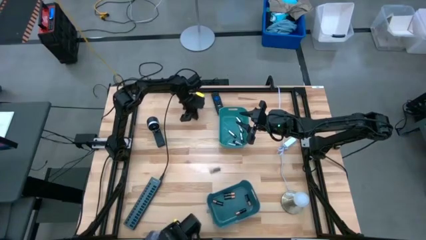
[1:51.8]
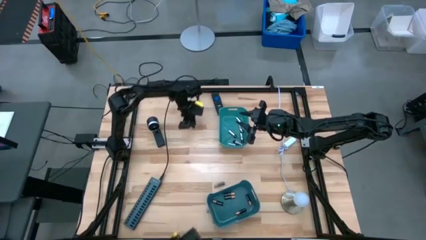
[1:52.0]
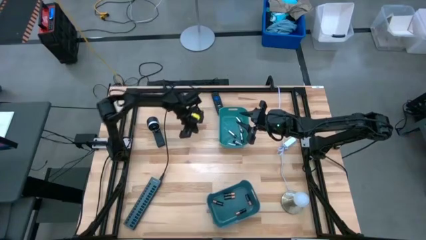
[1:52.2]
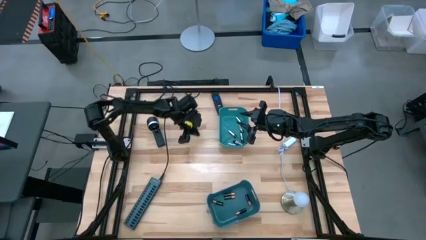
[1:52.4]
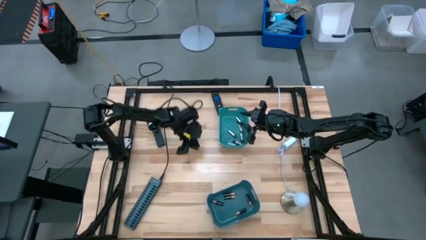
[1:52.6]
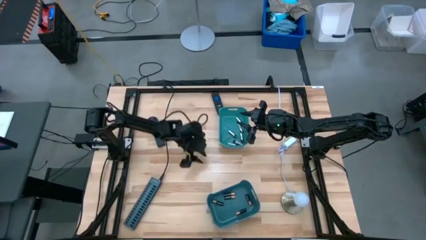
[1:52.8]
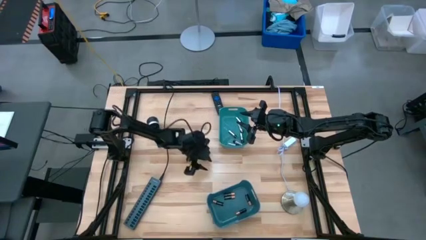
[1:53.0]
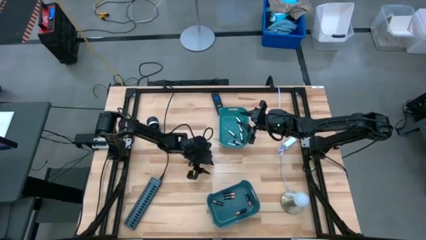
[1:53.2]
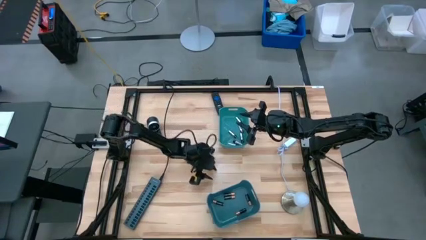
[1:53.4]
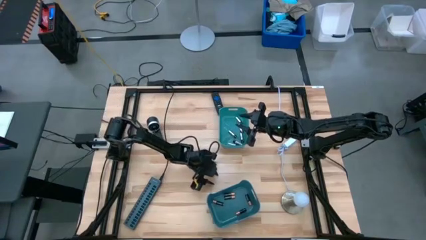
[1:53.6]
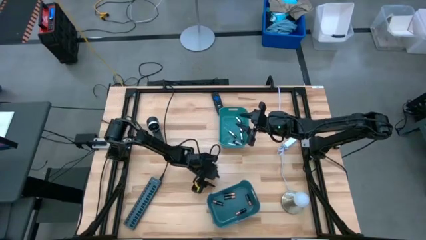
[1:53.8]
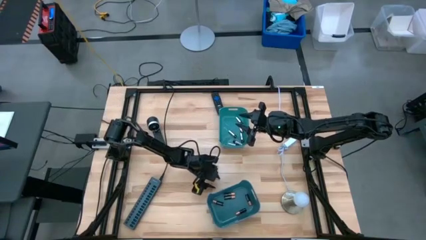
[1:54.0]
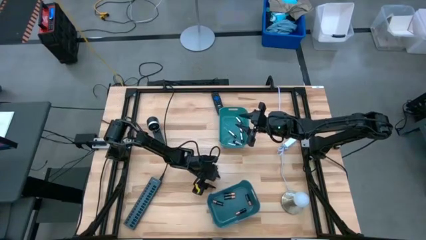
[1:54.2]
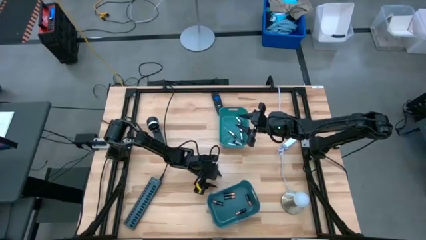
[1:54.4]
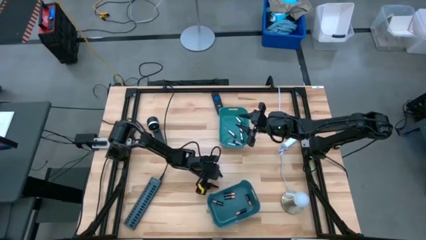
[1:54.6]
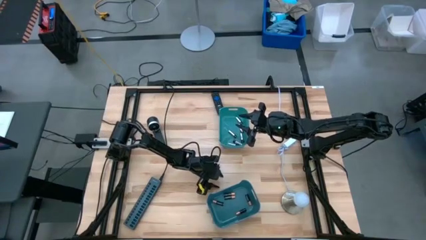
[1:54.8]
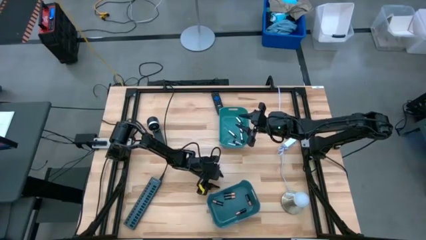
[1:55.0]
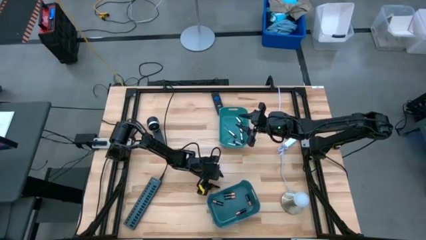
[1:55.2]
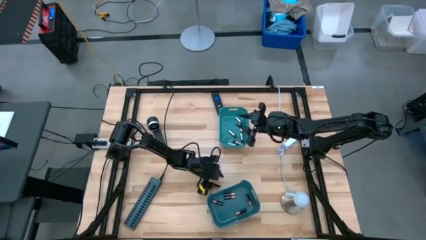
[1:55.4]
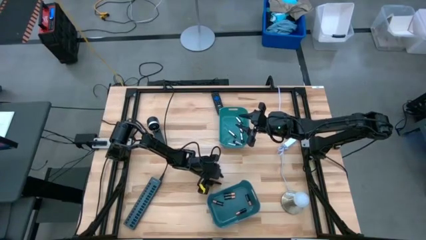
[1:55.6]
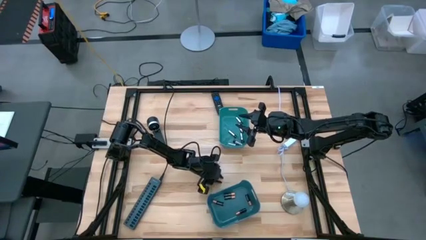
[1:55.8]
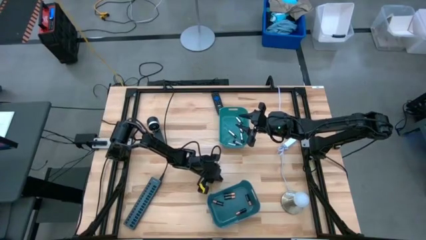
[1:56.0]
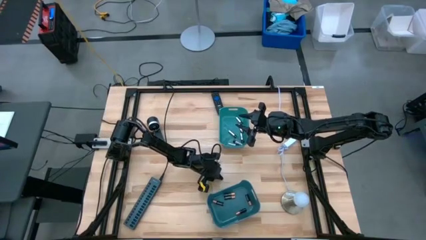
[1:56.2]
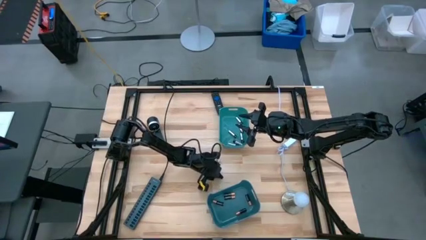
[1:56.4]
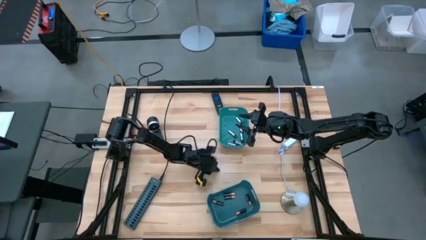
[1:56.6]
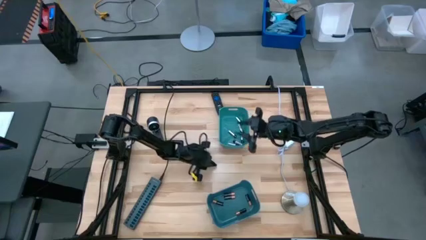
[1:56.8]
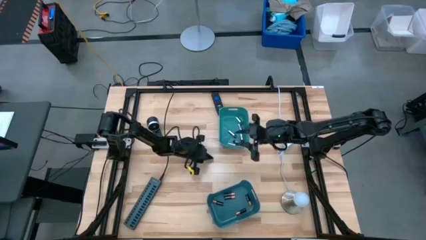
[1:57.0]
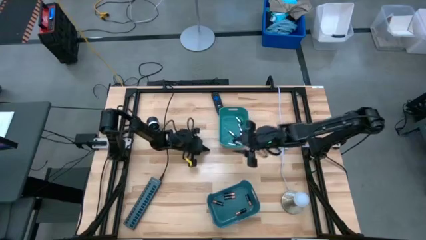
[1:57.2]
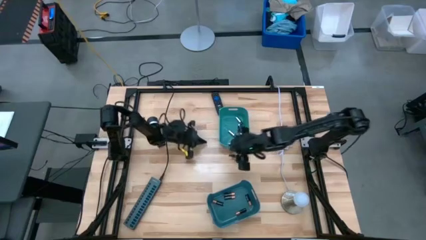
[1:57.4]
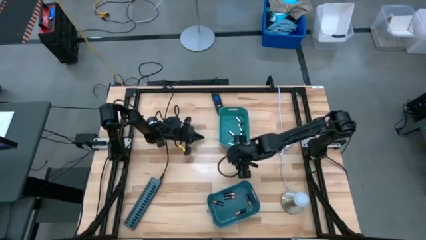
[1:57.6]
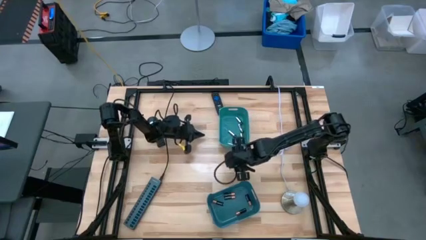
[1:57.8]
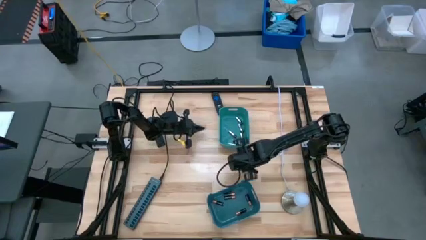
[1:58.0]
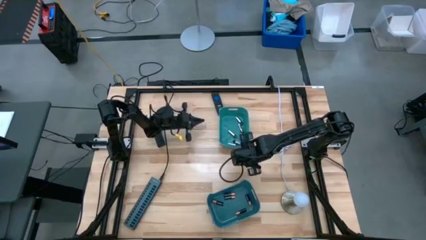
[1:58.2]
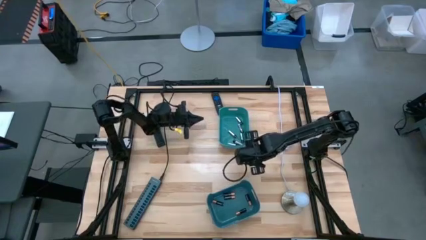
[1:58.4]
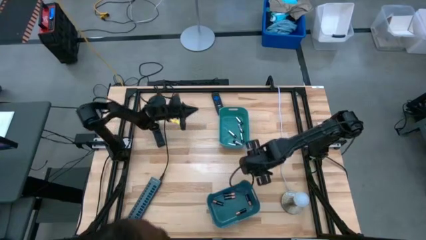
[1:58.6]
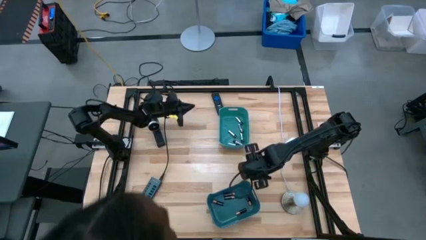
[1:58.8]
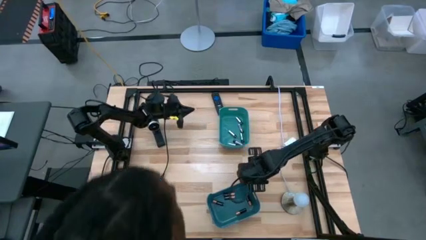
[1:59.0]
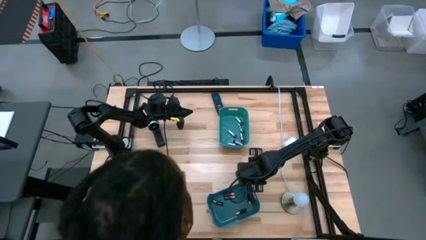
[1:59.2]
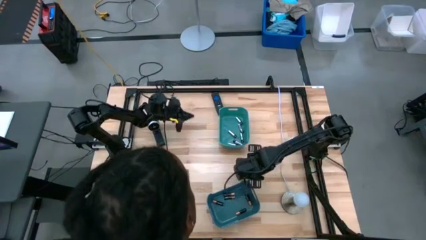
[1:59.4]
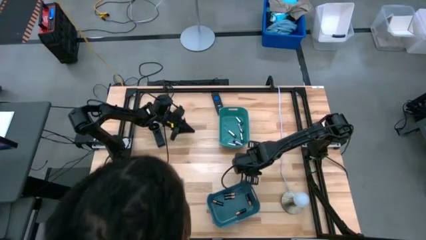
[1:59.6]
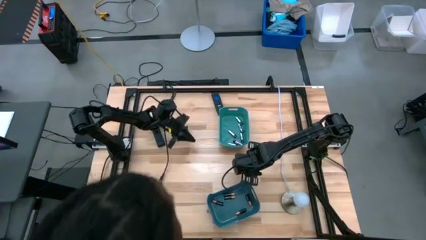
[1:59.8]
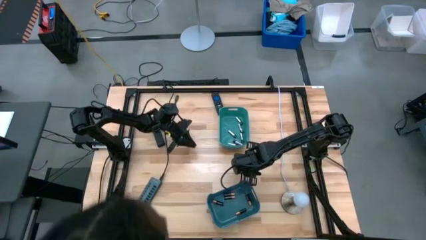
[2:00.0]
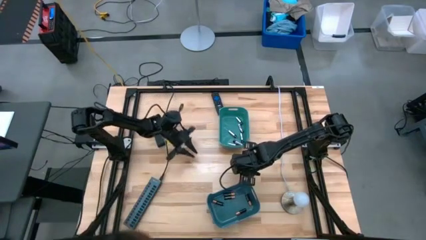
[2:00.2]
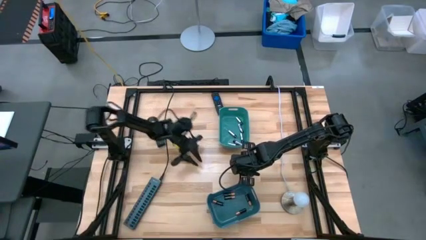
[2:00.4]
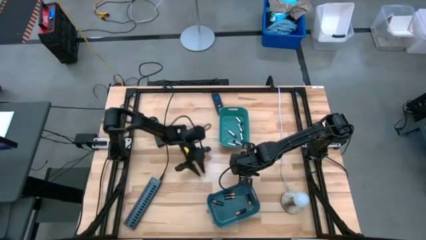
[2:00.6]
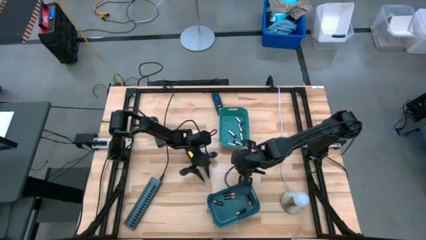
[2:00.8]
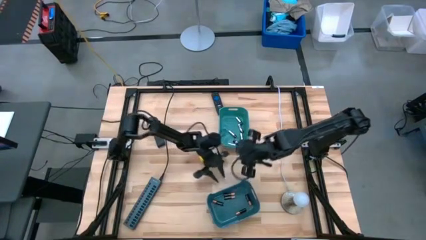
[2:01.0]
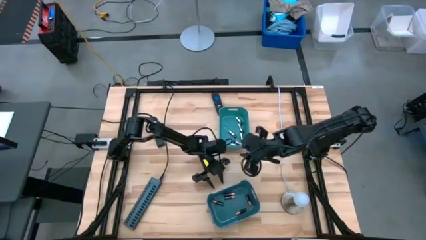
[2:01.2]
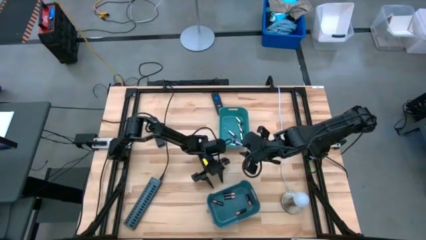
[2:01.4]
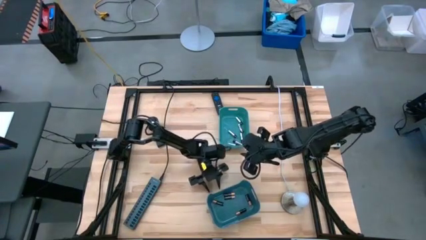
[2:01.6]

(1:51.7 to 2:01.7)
Task: Sort batteries
Put the black battery into the blue bin

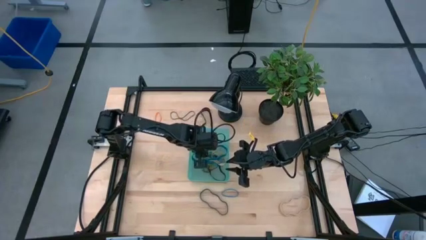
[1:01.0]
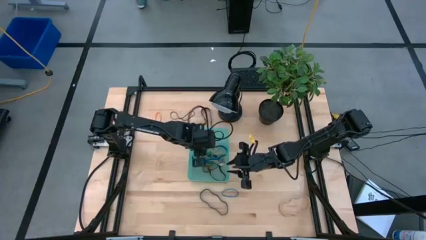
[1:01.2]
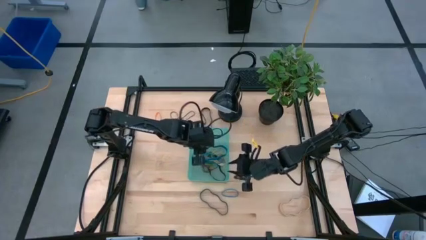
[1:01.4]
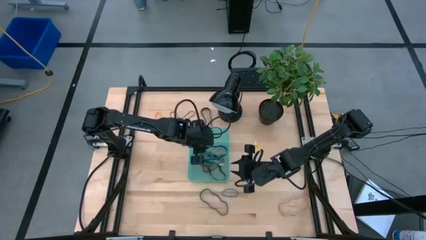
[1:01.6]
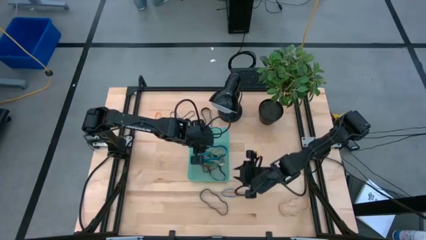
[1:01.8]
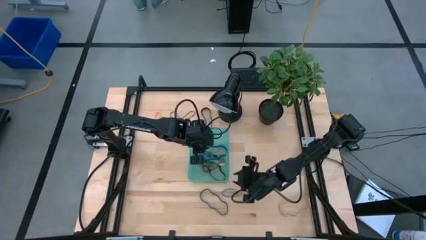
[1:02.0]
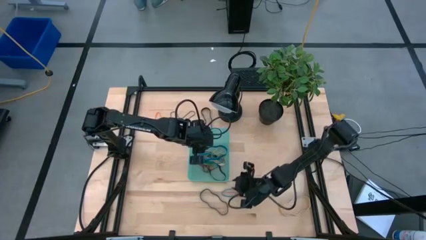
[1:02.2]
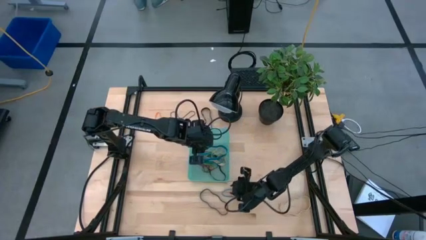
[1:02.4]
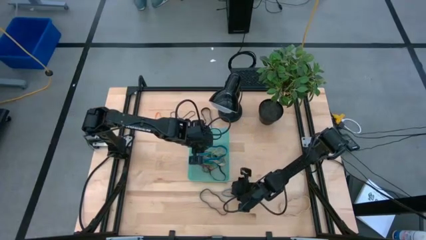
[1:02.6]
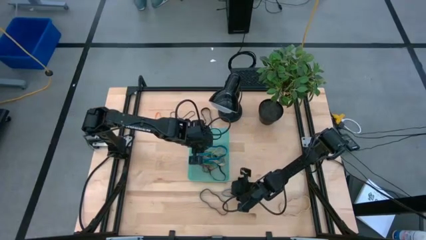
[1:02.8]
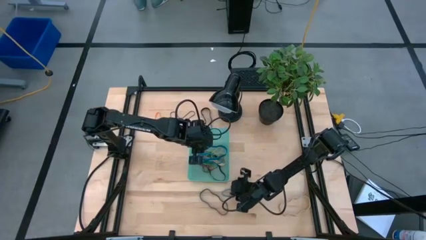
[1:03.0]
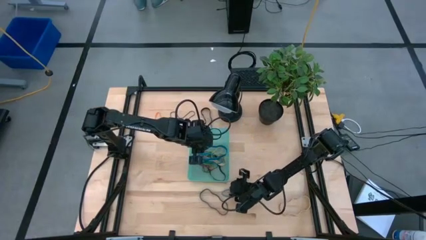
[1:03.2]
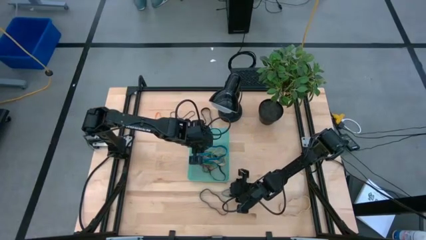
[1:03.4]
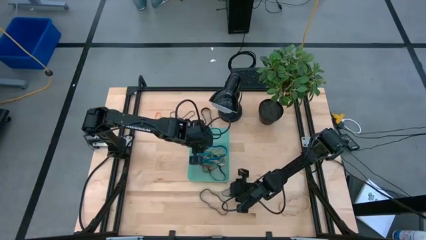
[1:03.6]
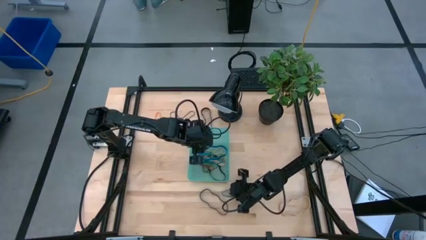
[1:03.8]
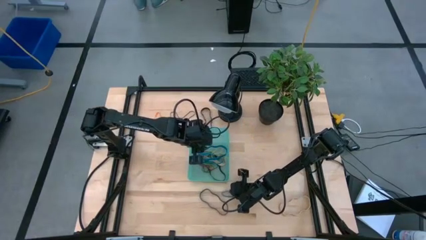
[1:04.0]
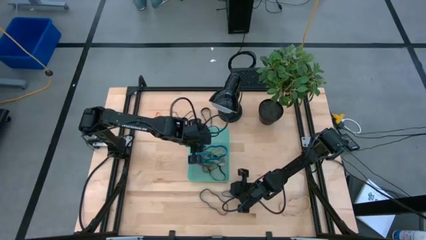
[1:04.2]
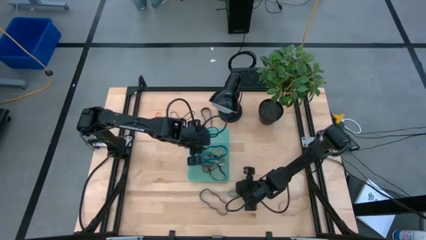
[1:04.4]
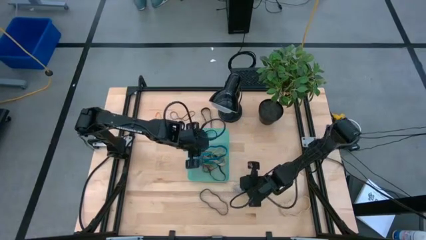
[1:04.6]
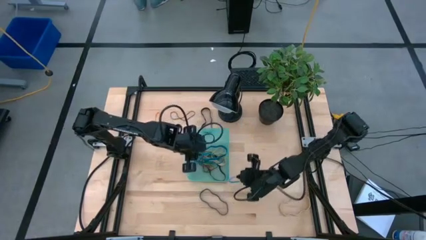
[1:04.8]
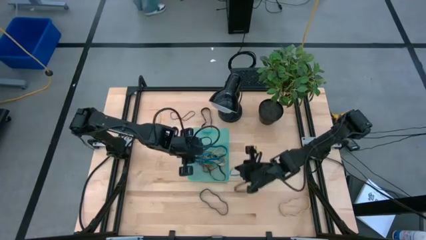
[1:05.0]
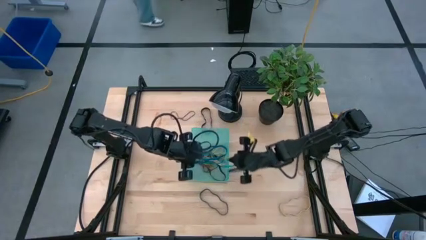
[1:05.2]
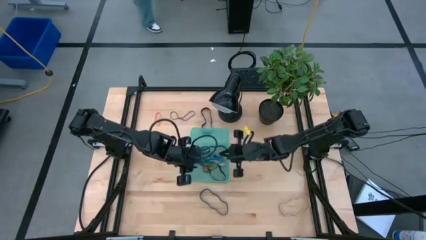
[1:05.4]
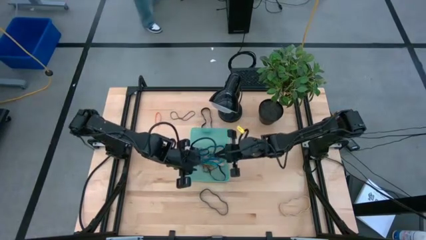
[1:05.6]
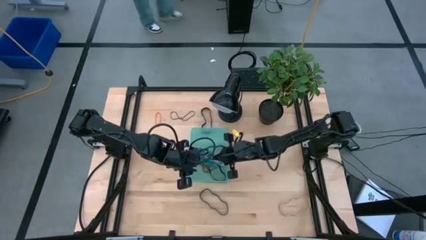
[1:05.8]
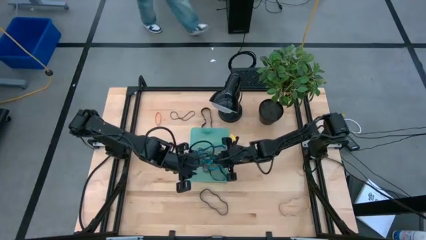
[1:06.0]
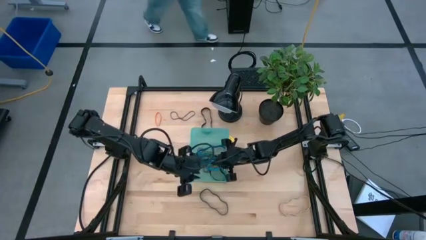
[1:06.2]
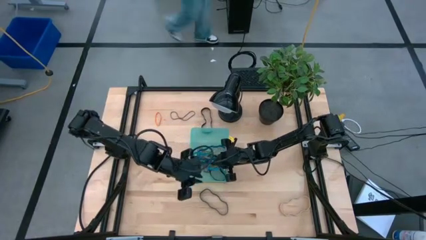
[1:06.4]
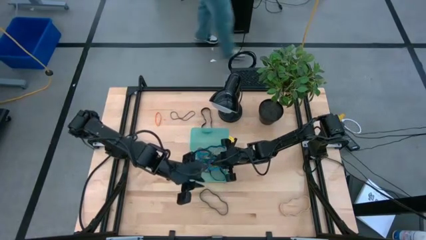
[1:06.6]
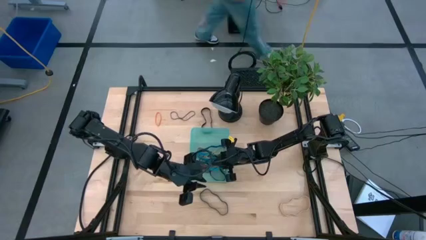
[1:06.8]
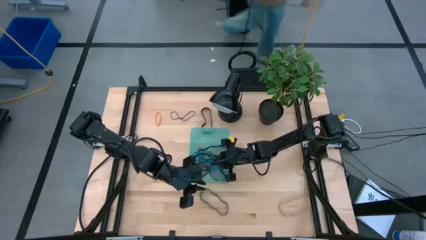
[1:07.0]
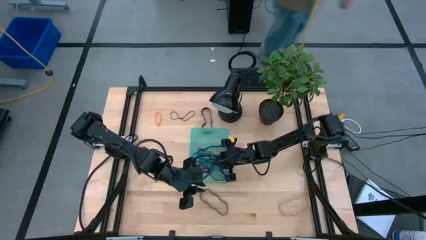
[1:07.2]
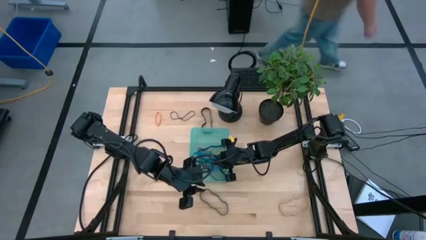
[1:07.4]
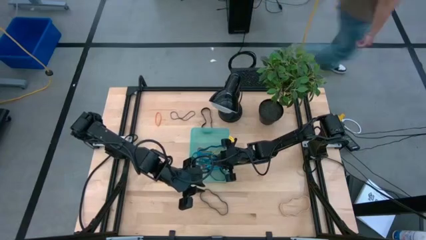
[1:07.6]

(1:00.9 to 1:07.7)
Task: Pick and place rubber bands into bin
Put the blue rubber band into the basket
